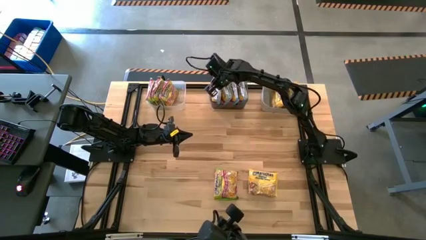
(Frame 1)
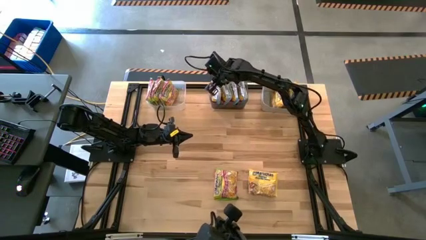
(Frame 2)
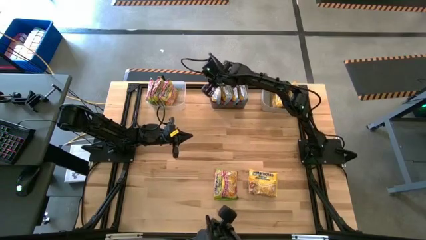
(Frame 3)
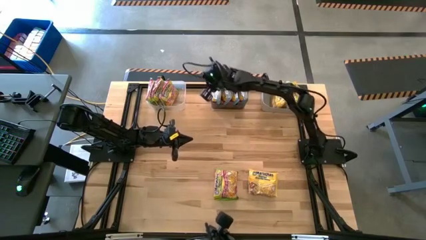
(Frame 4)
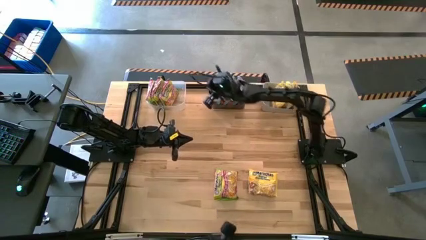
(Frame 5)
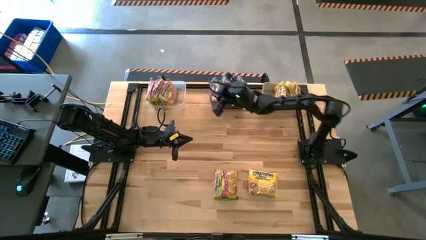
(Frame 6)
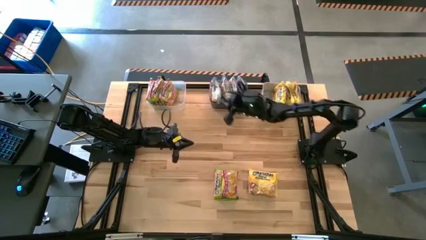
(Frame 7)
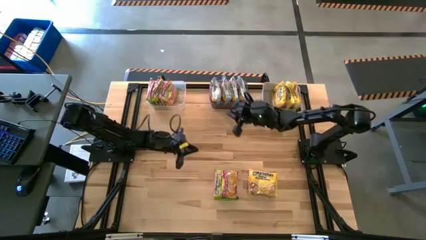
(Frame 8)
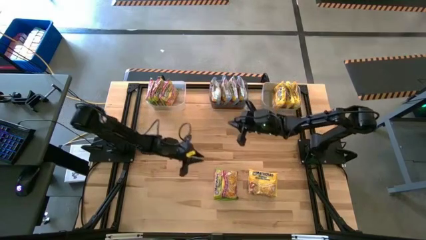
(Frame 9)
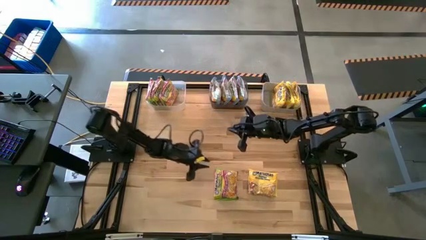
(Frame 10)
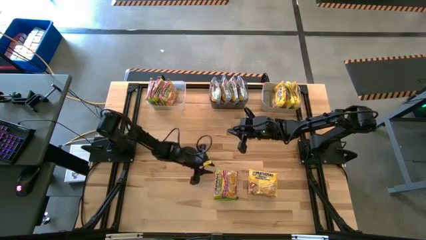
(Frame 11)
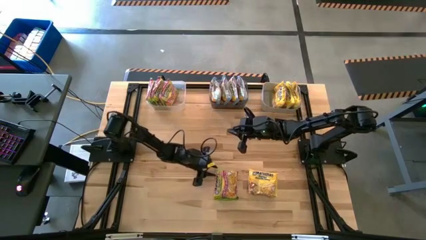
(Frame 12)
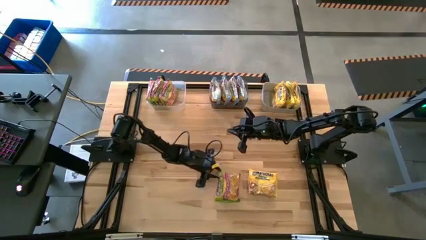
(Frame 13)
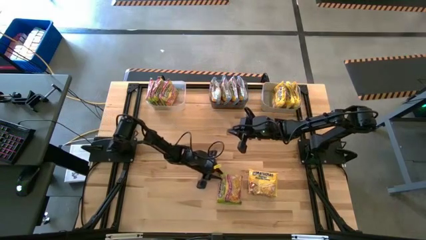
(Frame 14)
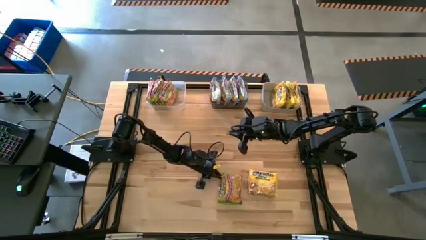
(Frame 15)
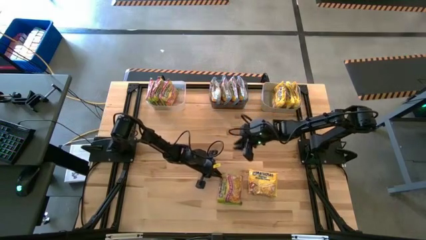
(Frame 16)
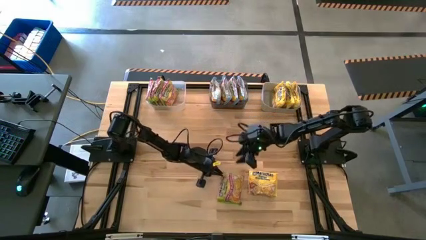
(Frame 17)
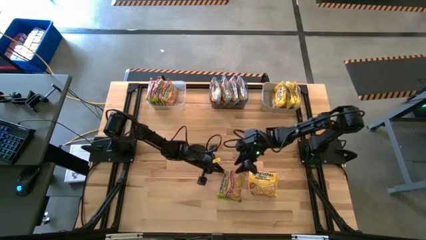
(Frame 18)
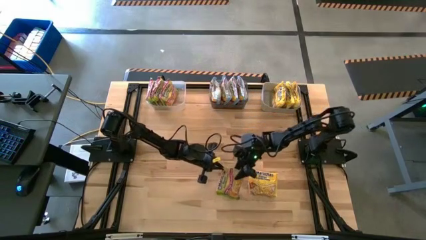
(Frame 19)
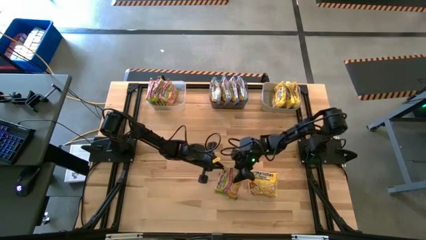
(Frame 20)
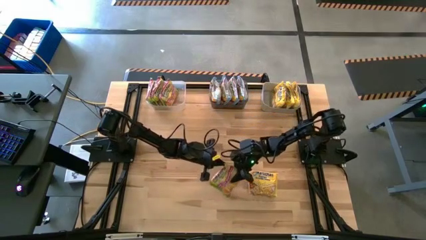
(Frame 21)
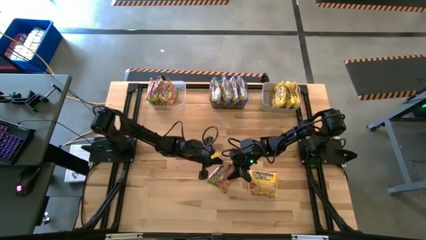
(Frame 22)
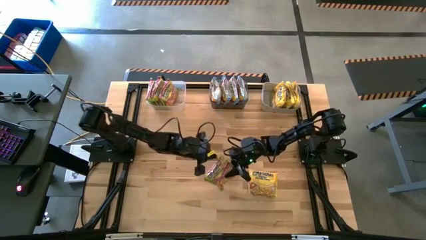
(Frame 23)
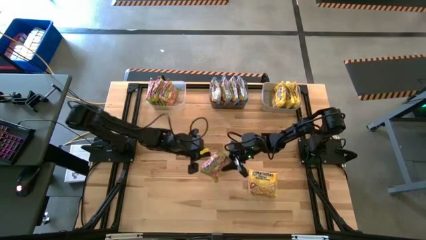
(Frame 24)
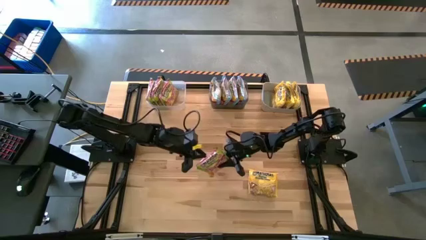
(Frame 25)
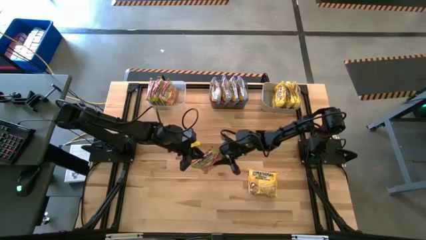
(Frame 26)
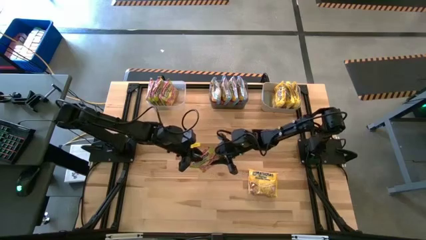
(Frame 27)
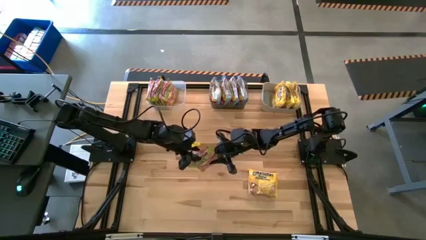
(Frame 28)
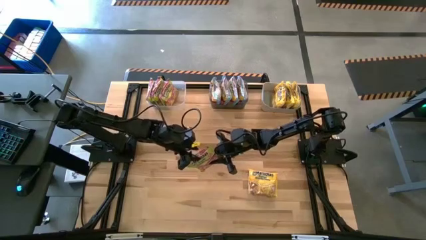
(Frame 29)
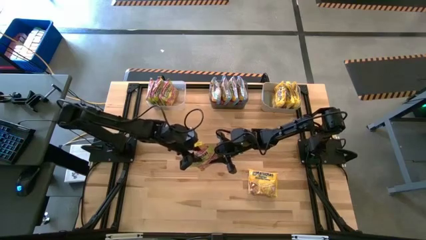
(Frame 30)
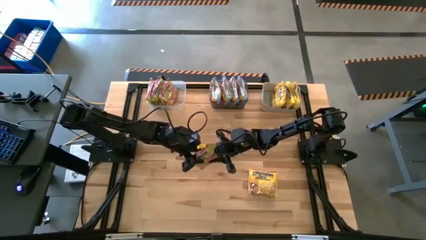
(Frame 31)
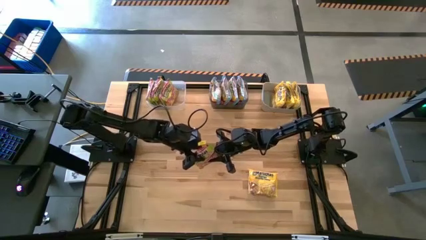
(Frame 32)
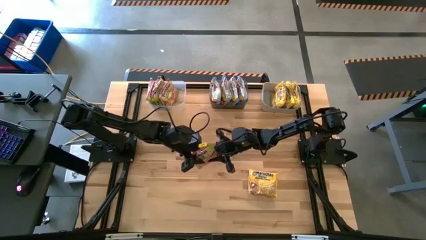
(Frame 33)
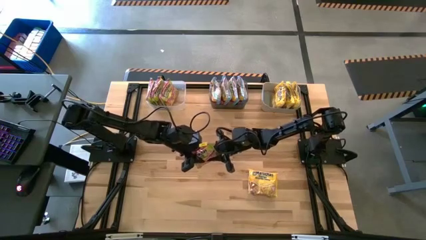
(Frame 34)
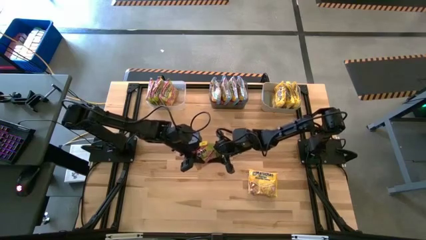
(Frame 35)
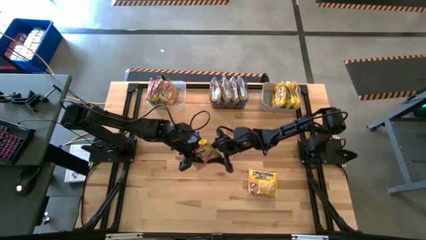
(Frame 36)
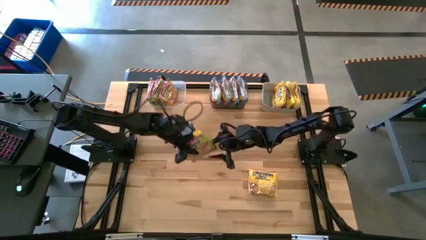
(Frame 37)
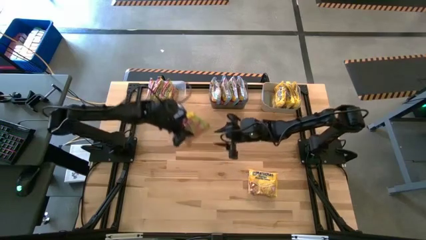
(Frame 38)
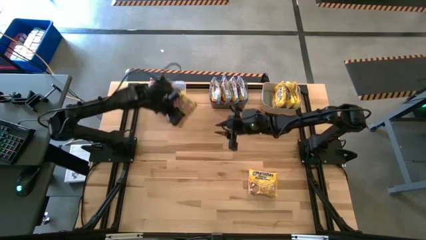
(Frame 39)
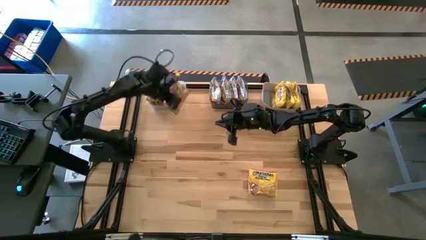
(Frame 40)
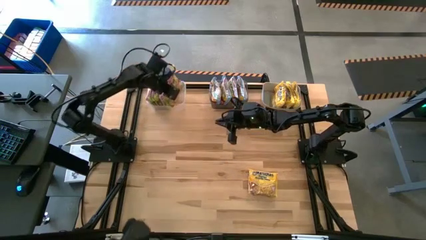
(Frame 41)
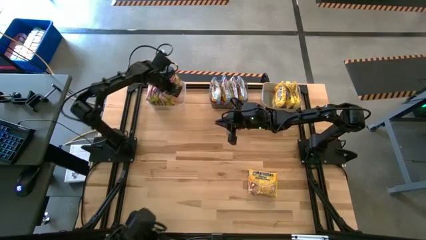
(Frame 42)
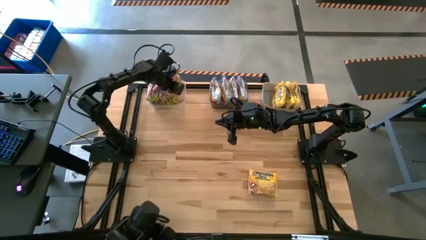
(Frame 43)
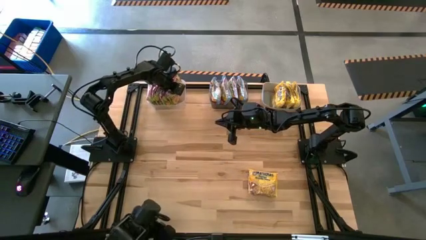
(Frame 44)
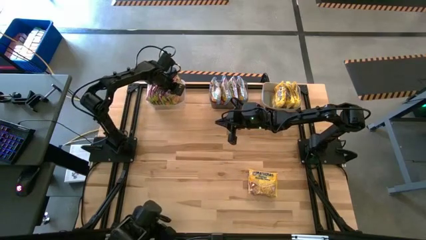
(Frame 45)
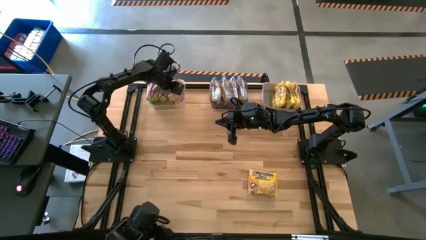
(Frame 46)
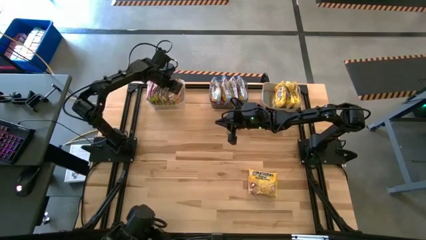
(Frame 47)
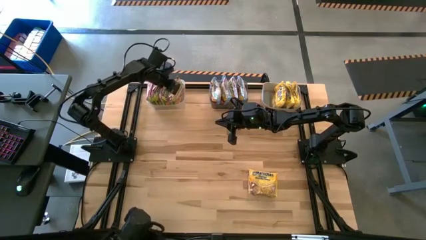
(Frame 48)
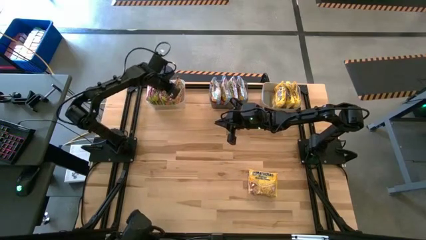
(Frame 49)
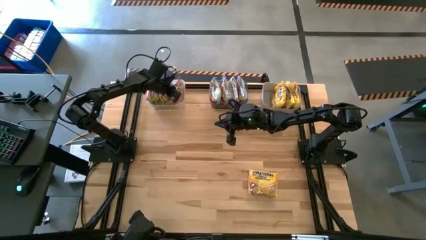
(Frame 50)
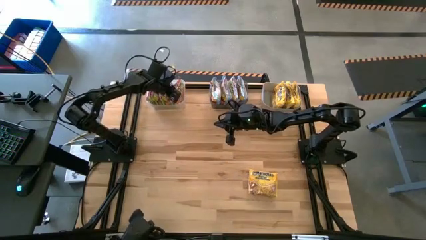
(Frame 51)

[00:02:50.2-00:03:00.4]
Task: Sort Maruchan noodles
Put the green noodle pack into the transparent bin

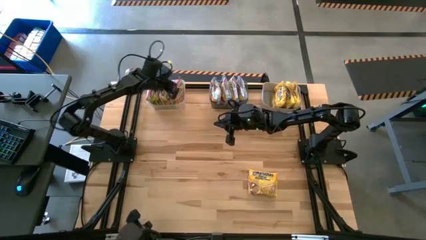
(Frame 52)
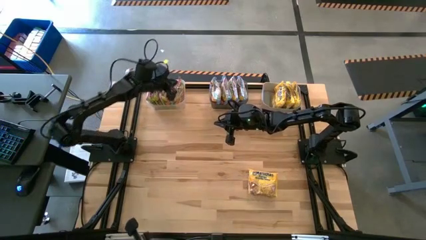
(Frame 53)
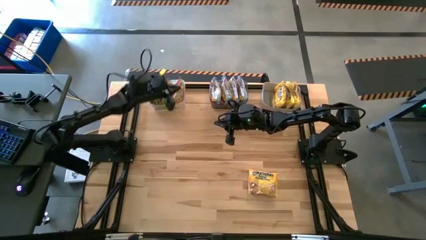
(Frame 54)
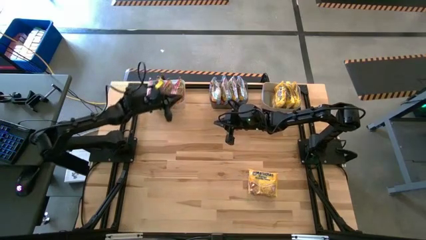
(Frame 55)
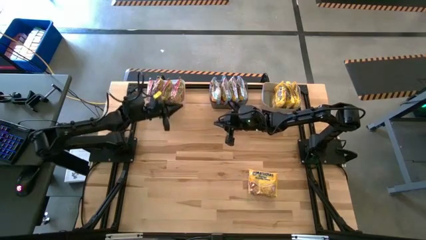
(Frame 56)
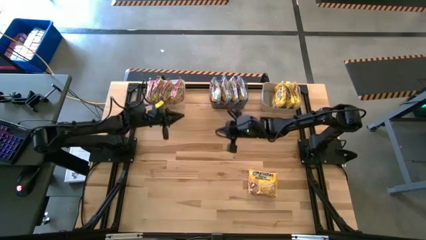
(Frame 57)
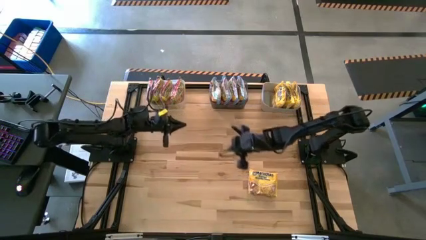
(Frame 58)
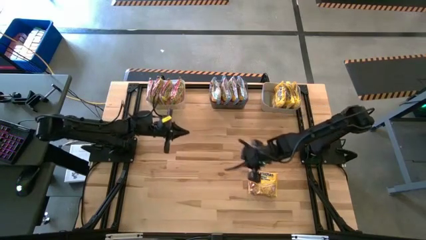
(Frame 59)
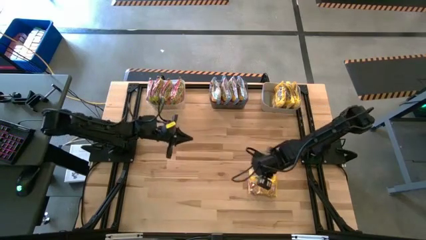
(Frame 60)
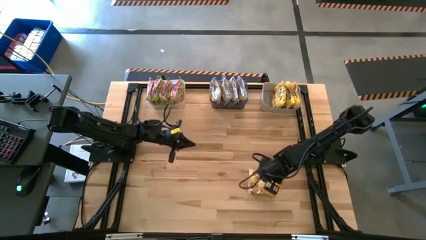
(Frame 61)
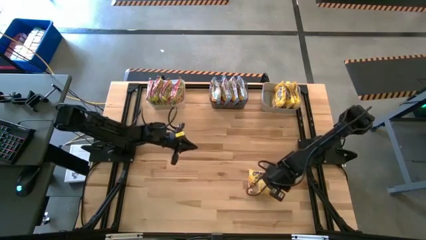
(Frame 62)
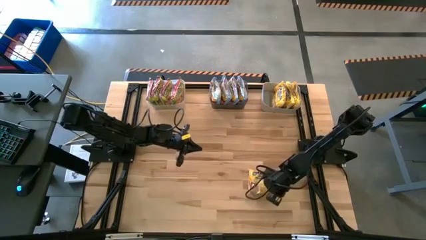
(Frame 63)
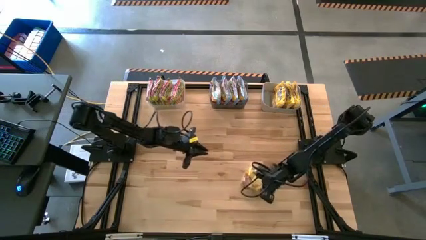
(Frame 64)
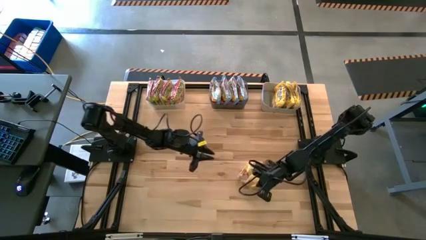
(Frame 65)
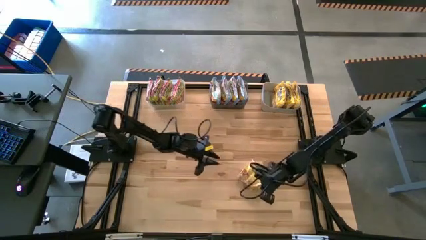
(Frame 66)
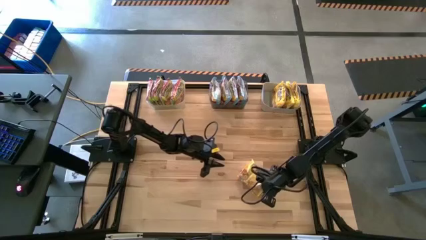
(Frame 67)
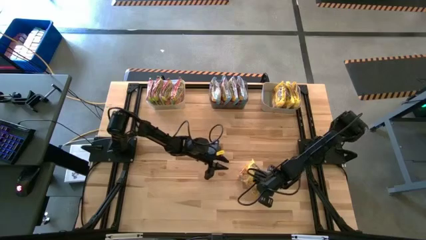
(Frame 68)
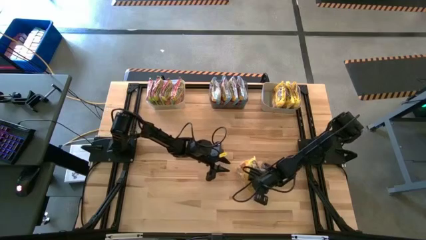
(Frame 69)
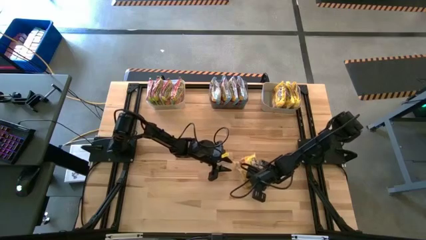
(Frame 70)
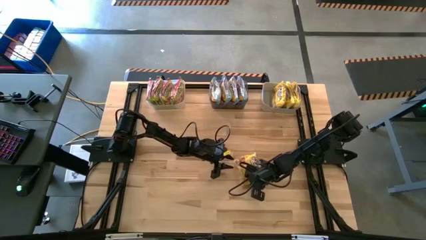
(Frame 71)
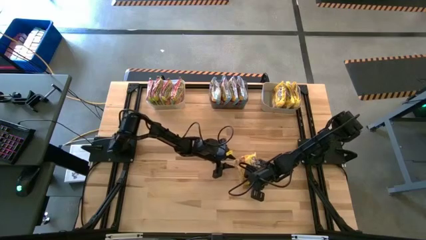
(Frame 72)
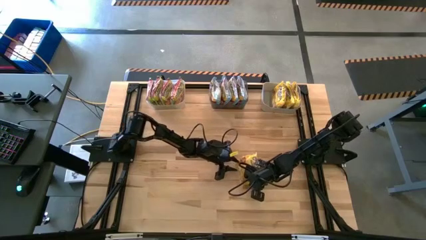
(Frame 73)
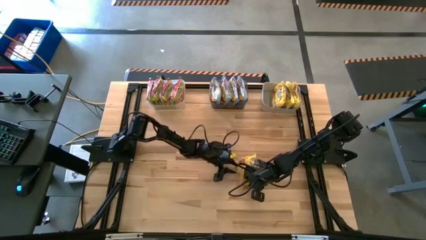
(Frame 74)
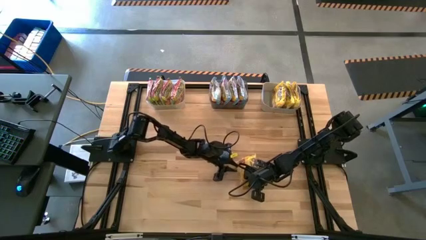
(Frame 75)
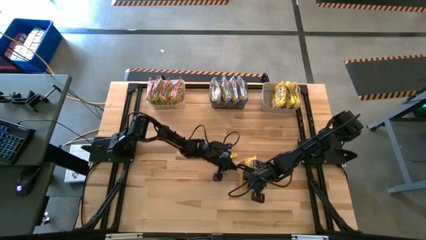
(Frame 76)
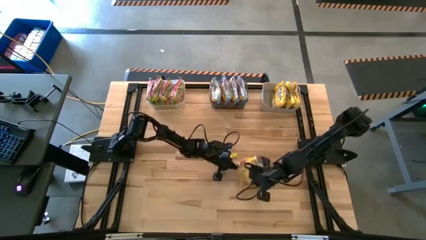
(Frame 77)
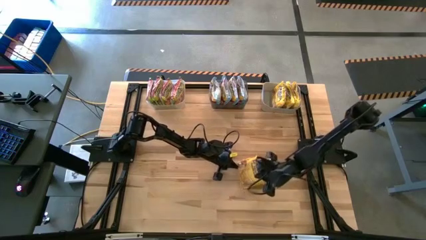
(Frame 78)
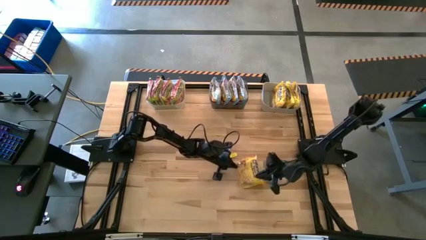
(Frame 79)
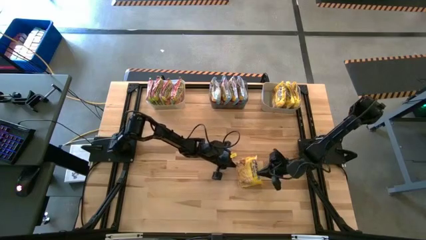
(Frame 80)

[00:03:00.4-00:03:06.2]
Put the yellow noodle pack into the gray bin
